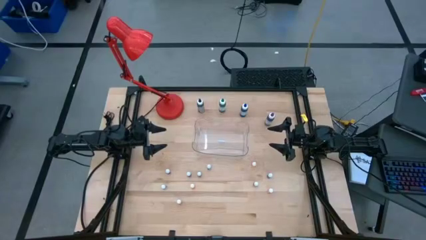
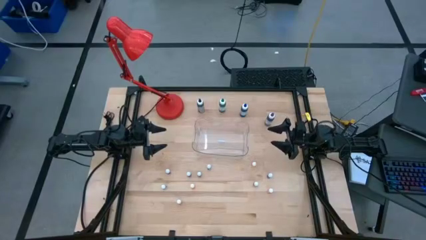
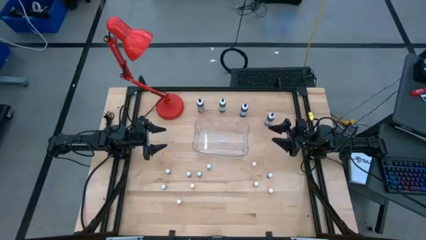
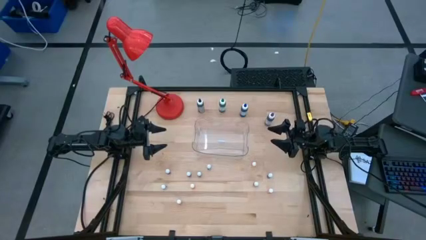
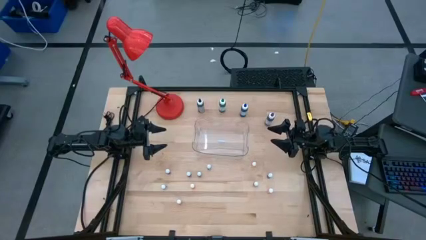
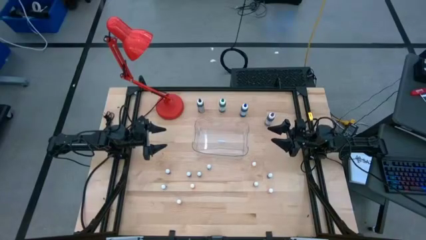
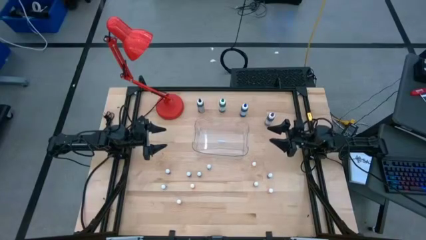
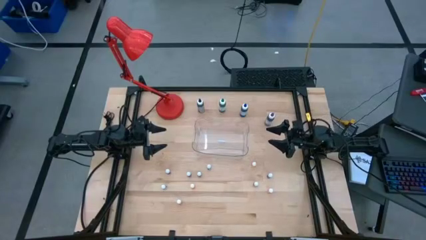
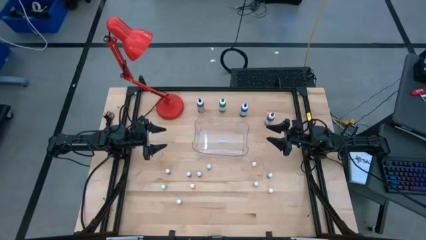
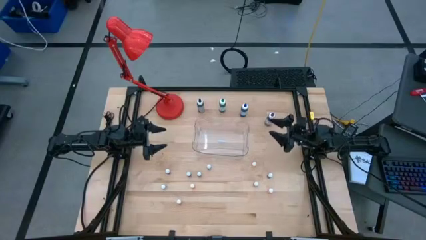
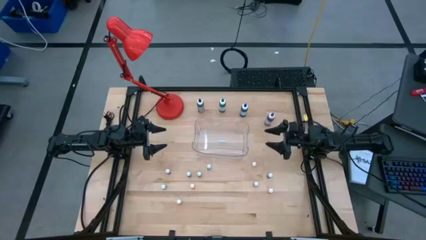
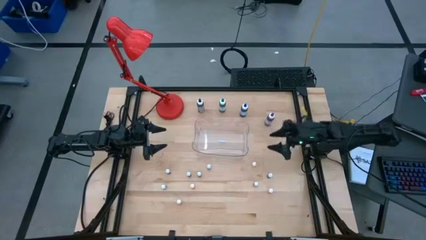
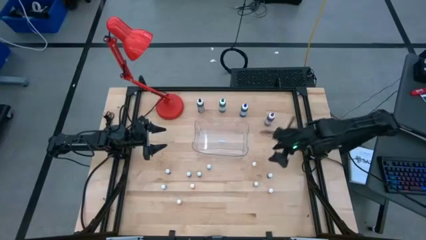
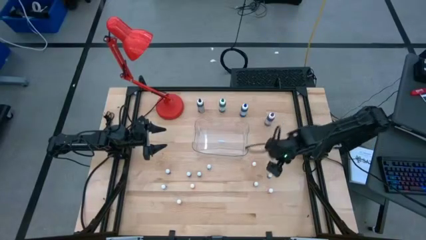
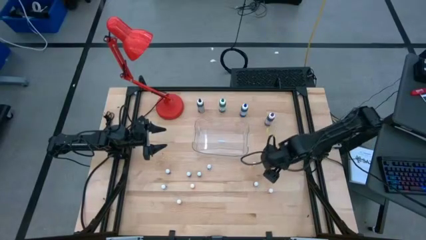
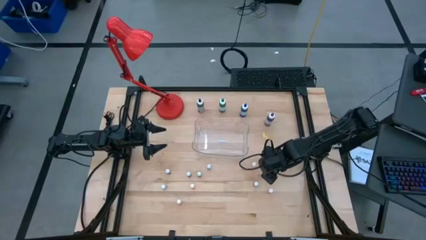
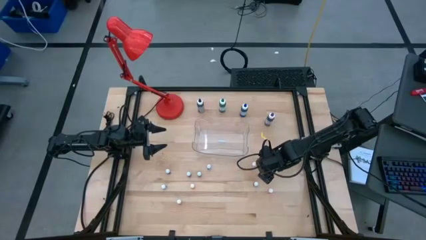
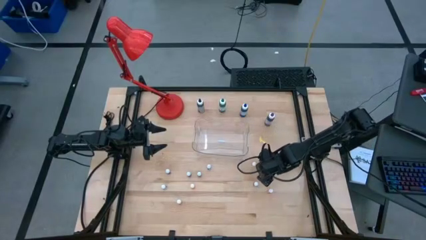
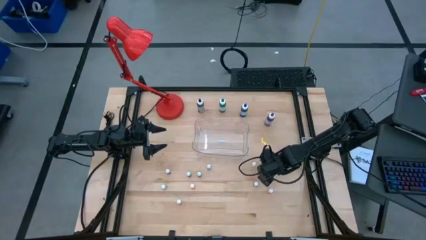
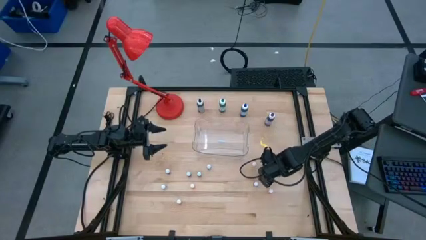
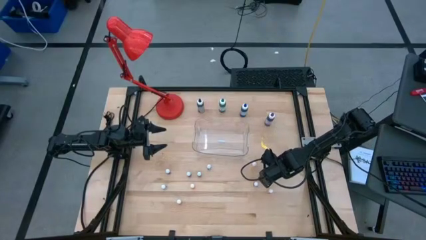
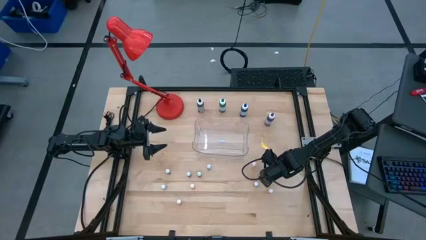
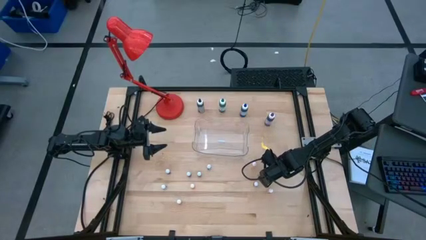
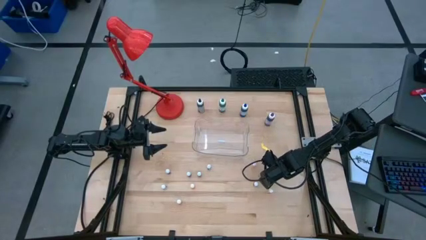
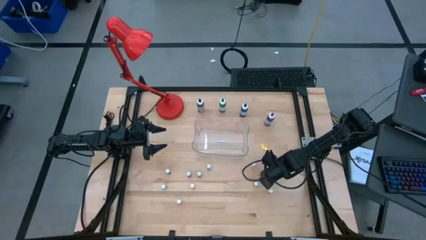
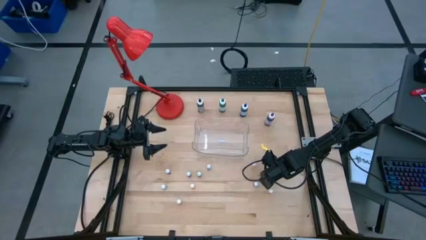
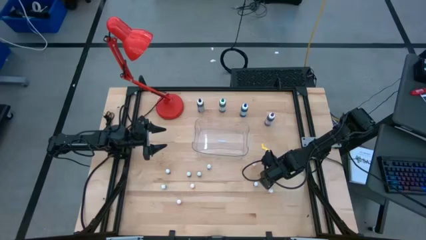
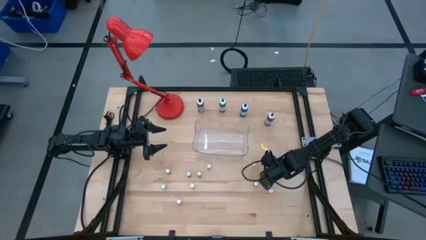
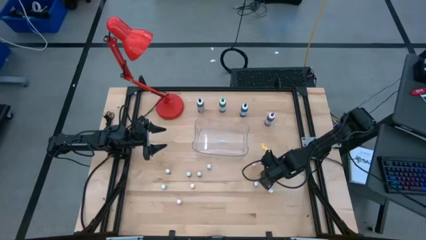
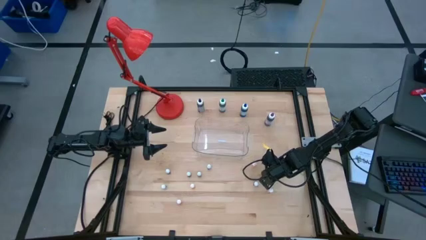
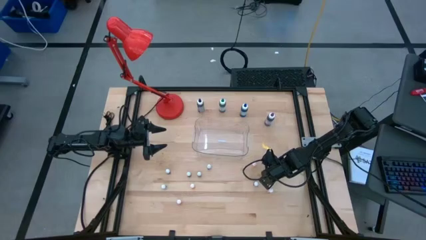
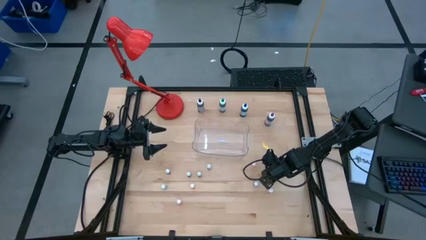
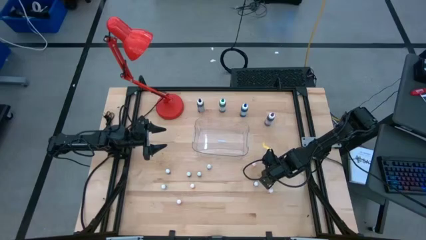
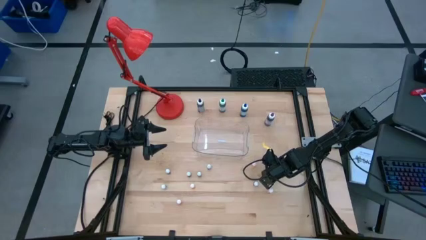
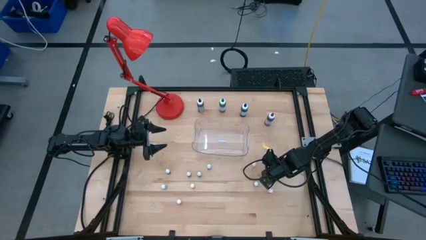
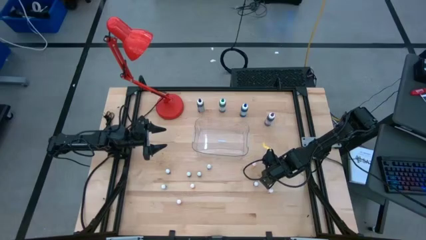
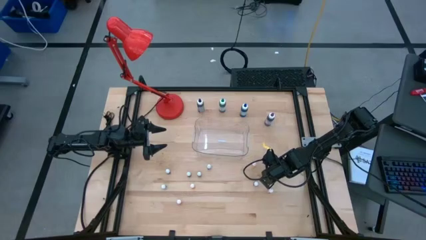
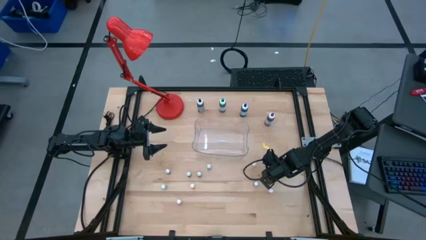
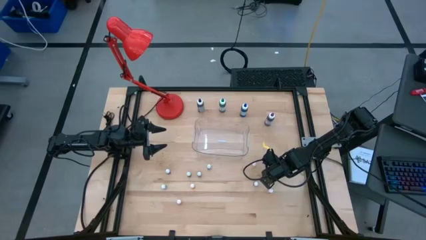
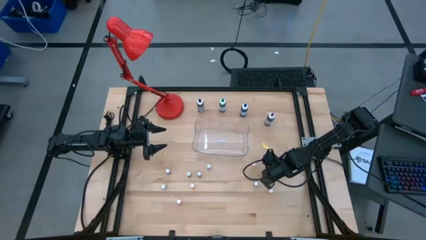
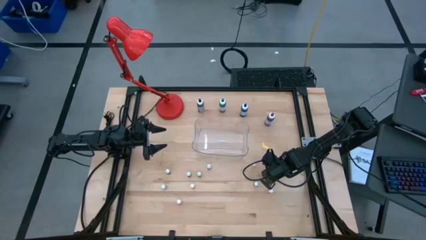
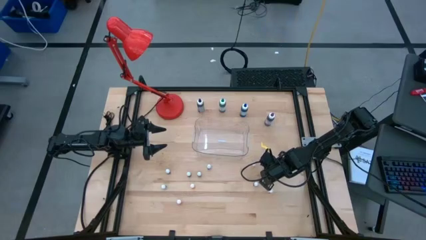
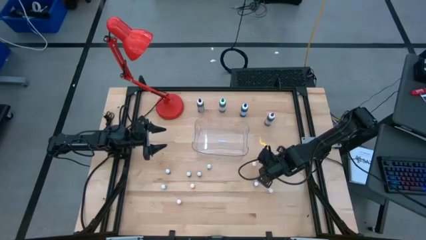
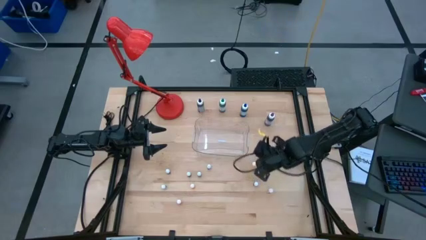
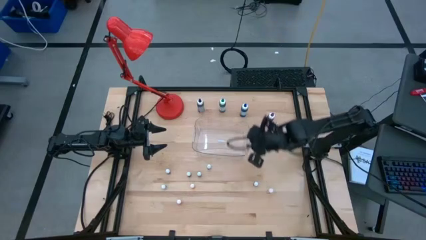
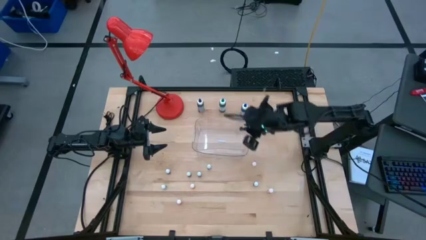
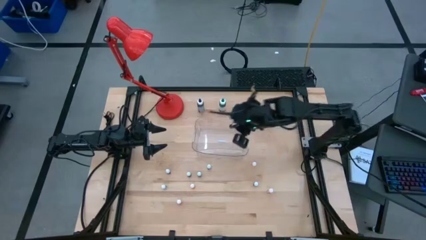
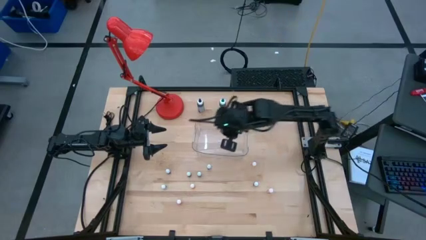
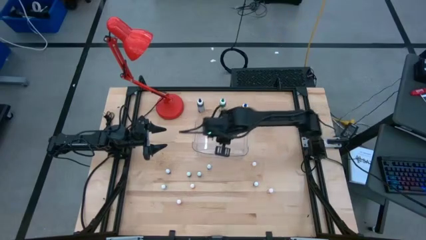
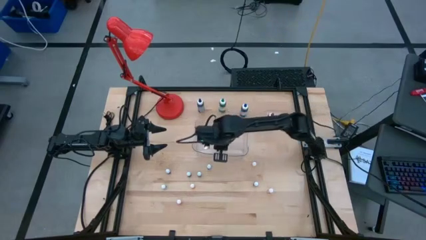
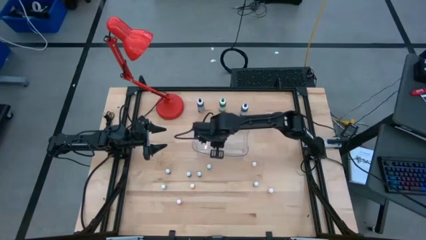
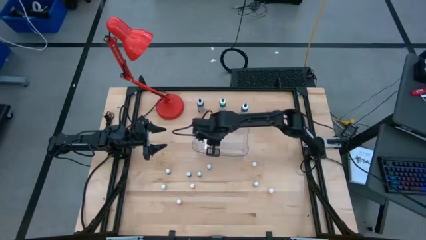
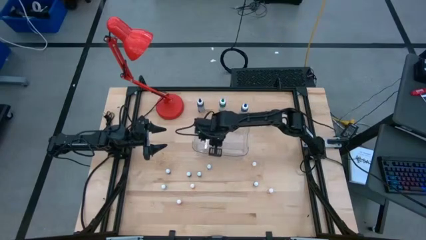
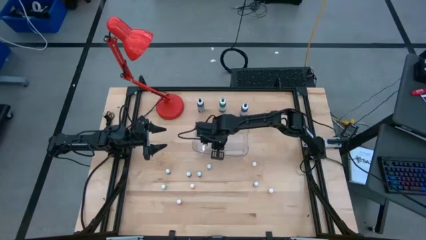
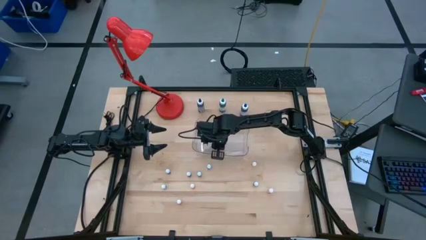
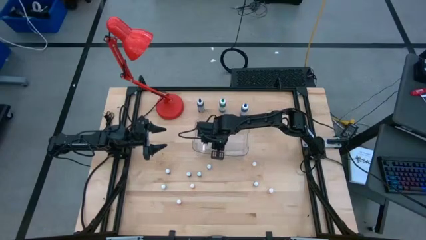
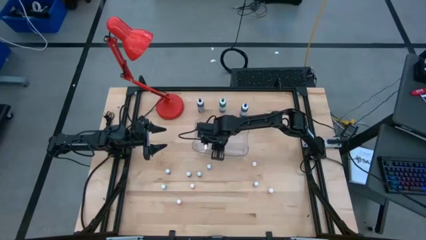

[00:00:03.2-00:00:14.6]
Task: Pick & Place food coloring
Put the small purple food coloring bottle in the transparent bin
